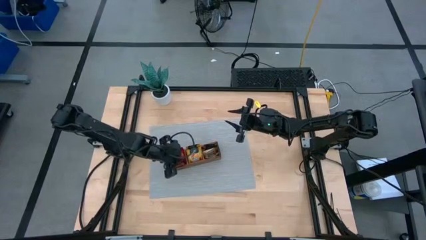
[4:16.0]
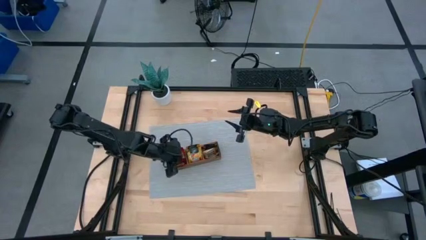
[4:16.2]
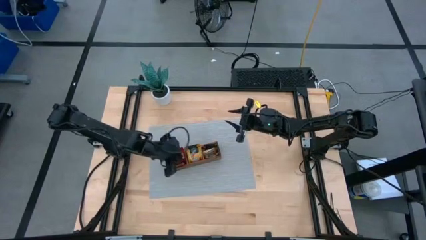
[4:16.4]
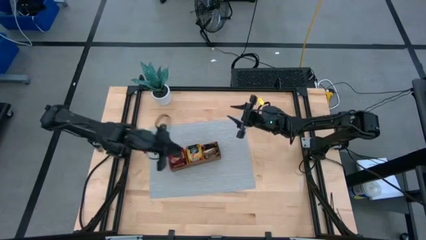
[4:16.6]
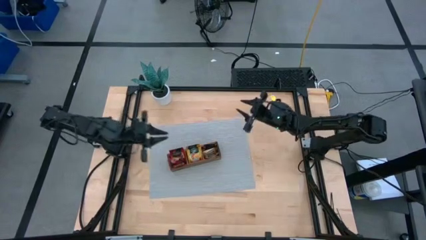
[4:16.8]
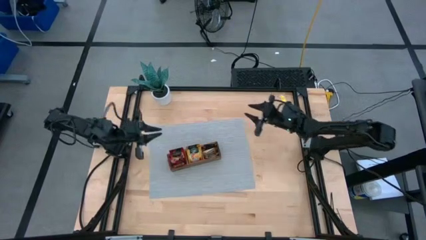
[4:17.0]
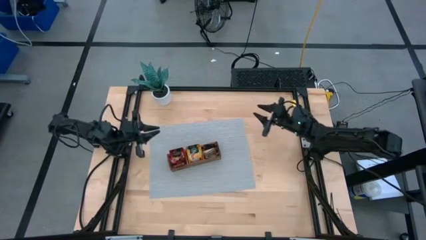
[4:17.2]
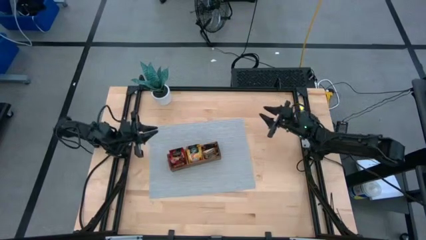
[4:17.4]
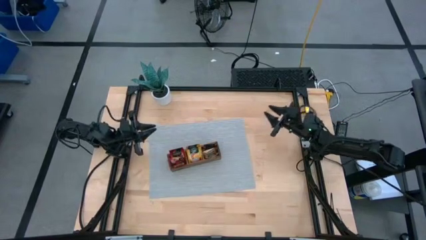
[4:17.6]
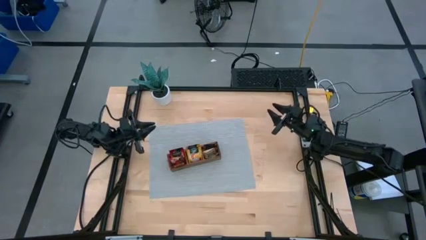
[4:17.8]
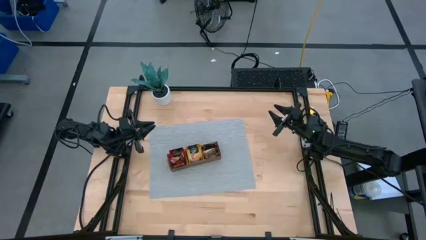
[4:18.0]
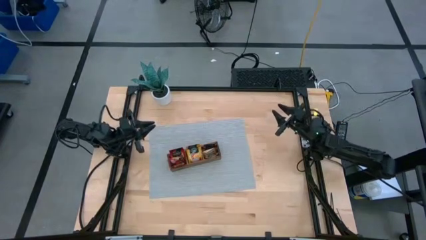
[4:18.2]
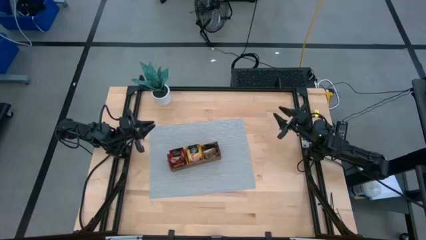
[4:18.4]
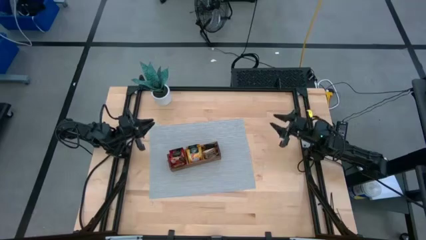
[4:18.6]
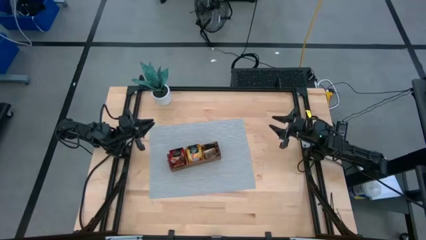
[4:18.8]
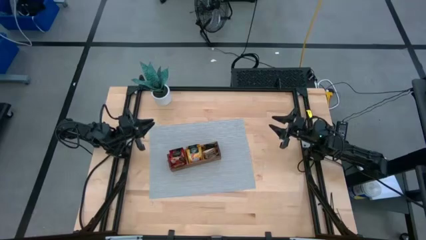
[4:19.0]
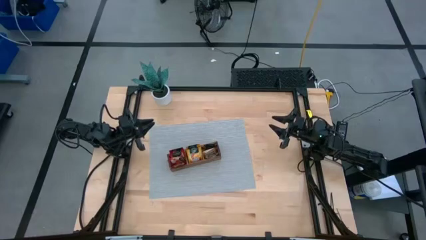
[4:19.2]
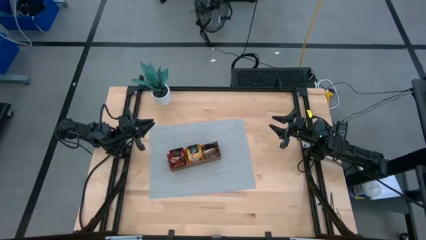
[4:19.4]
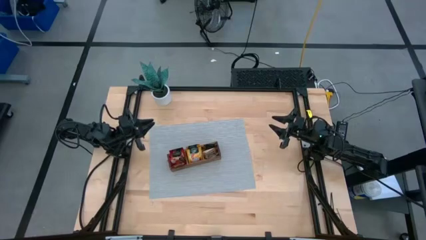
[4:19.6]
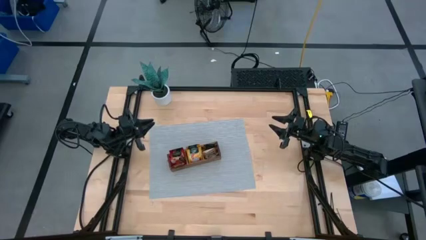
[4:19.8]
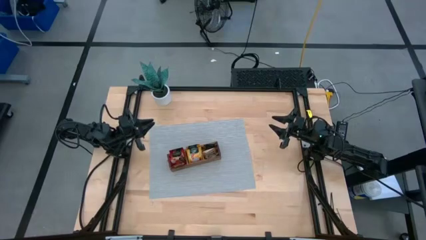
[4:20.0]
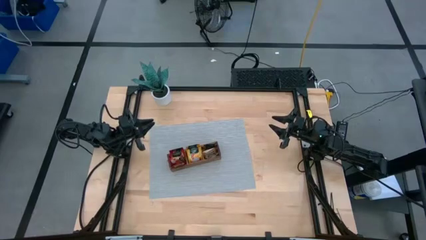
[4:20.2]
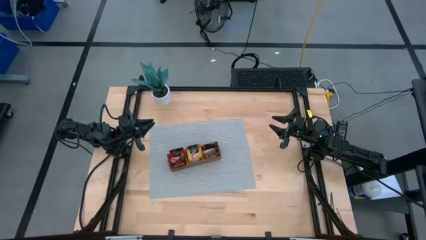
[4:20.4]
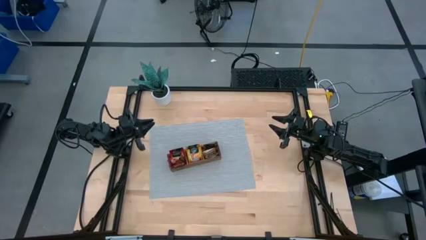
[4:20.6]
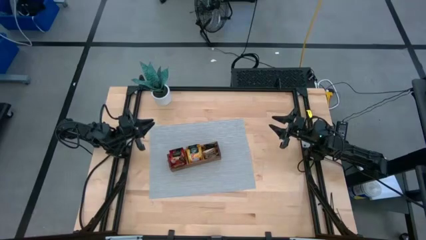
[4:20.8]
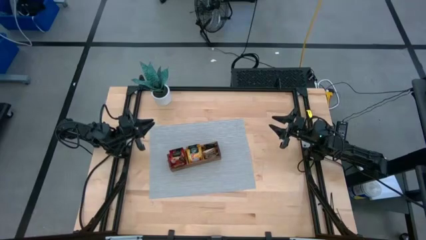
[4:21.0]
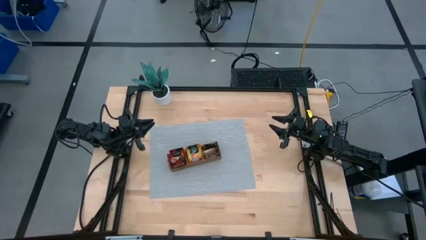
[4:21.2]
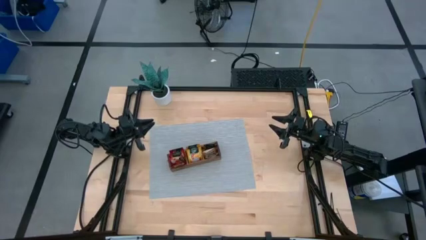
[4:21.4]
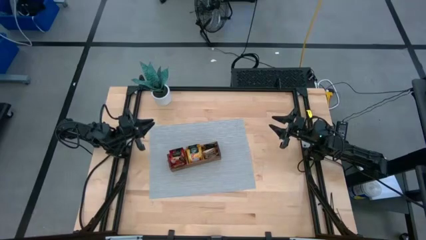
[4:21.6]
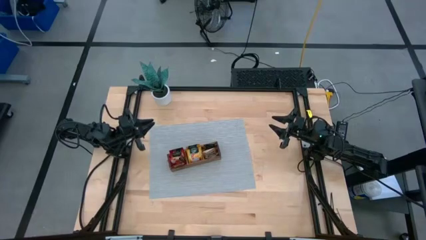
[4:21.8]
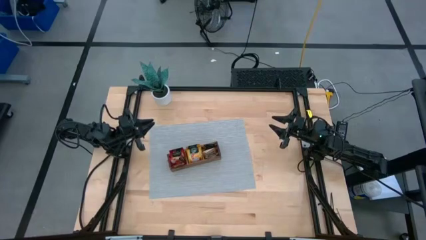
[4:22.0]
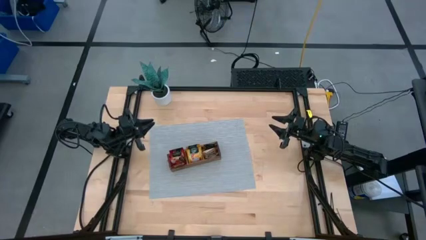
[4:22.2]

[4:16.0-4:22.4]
Task: Pick & Place Tea
Return to Home Position

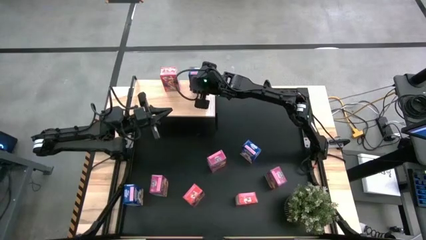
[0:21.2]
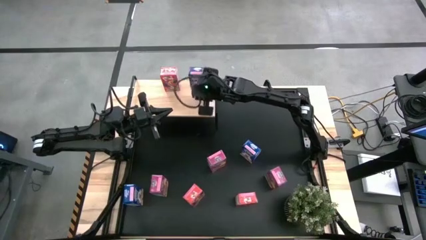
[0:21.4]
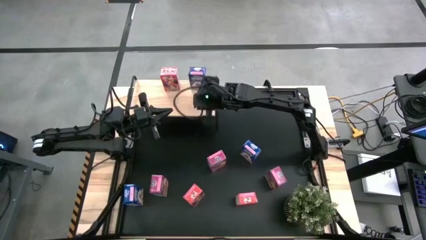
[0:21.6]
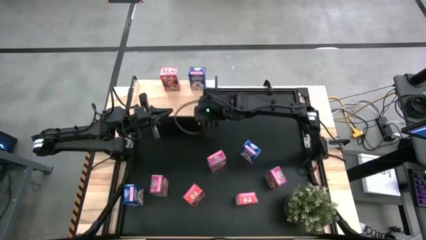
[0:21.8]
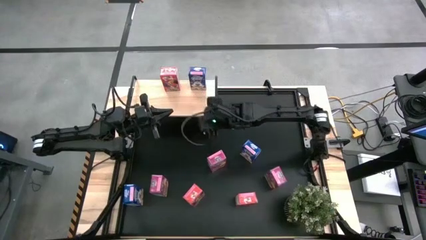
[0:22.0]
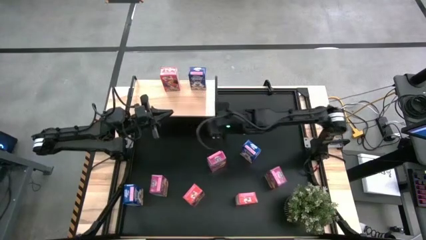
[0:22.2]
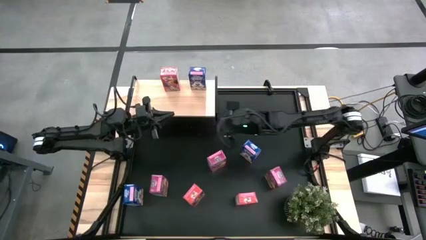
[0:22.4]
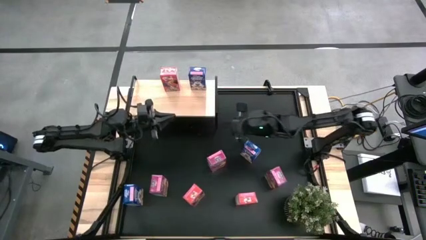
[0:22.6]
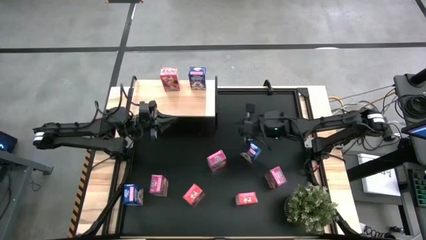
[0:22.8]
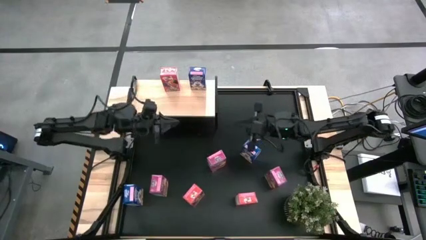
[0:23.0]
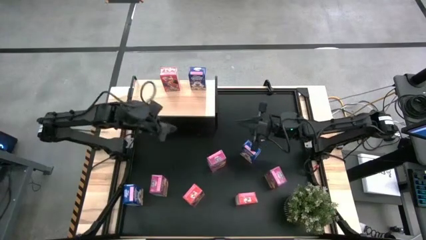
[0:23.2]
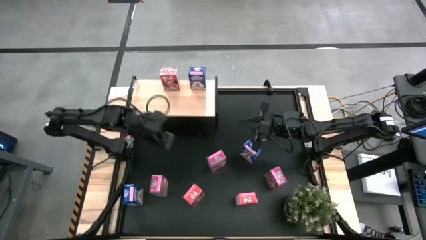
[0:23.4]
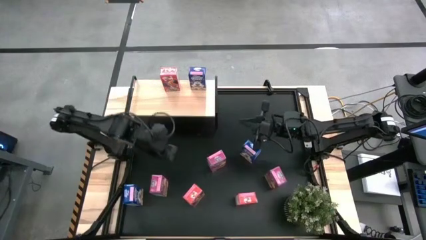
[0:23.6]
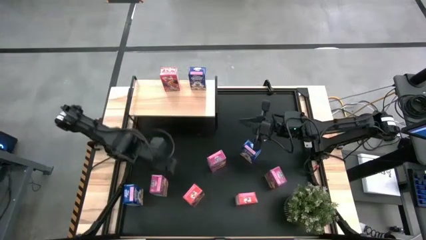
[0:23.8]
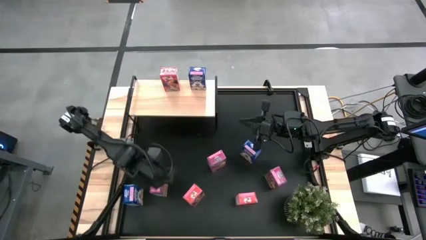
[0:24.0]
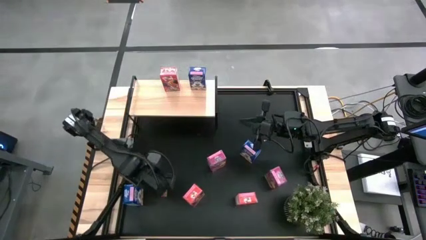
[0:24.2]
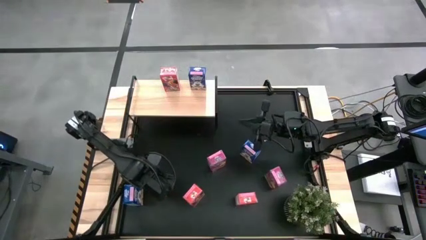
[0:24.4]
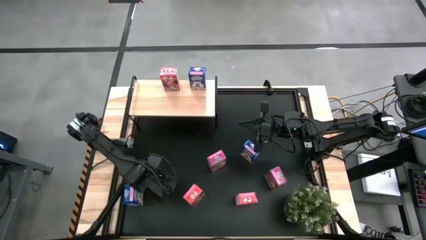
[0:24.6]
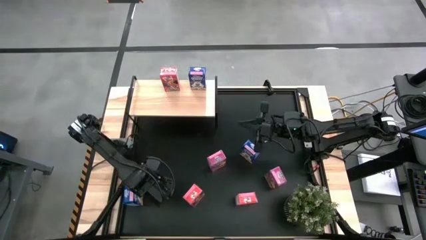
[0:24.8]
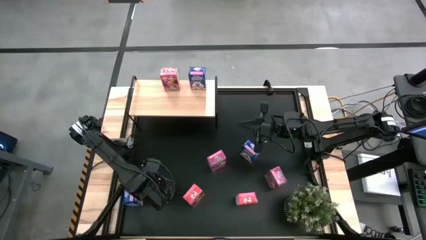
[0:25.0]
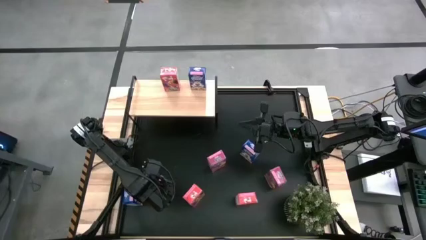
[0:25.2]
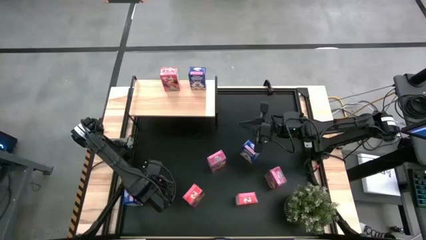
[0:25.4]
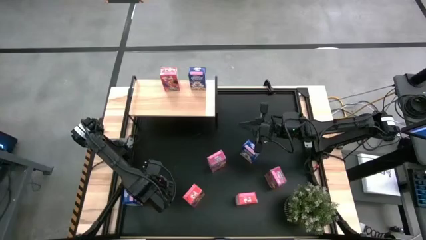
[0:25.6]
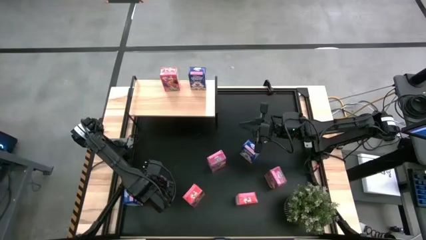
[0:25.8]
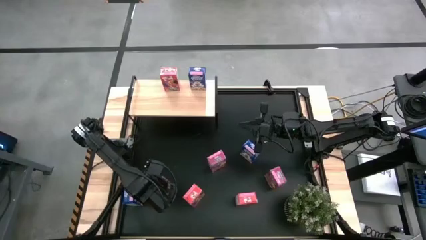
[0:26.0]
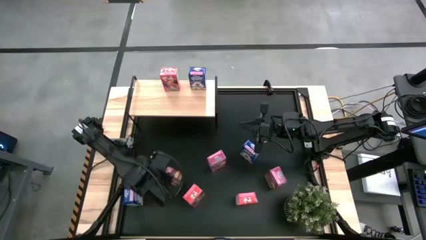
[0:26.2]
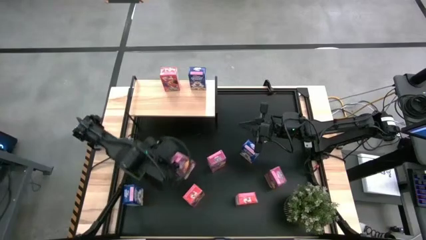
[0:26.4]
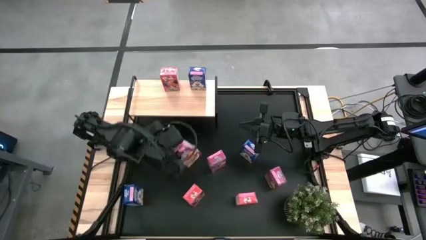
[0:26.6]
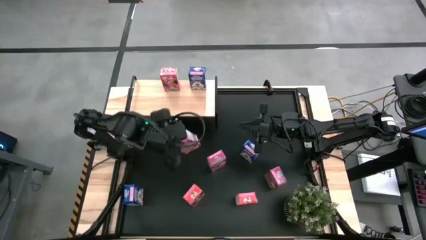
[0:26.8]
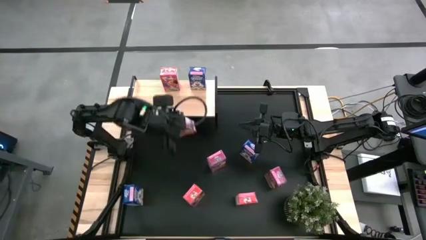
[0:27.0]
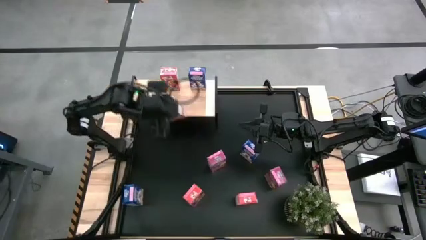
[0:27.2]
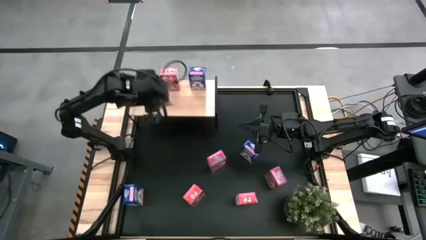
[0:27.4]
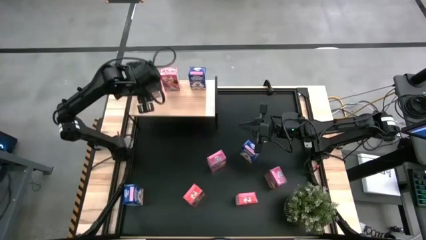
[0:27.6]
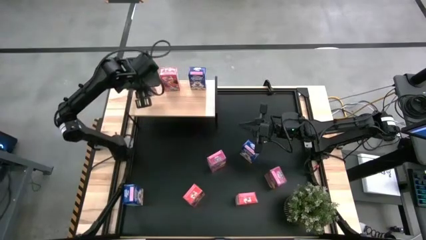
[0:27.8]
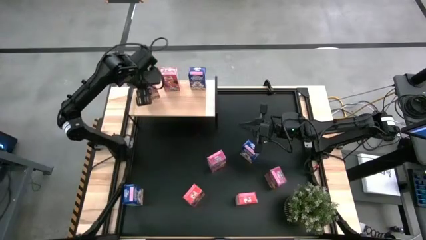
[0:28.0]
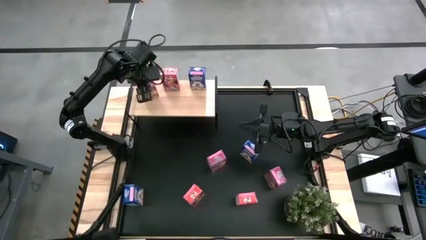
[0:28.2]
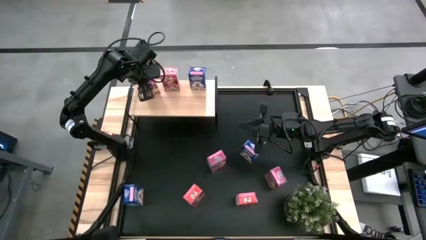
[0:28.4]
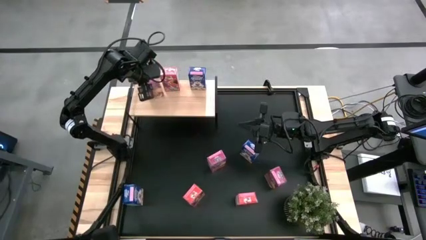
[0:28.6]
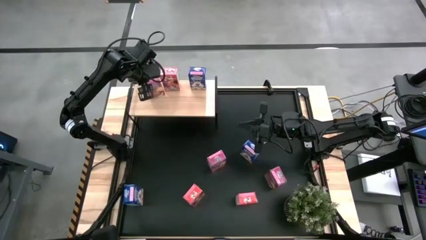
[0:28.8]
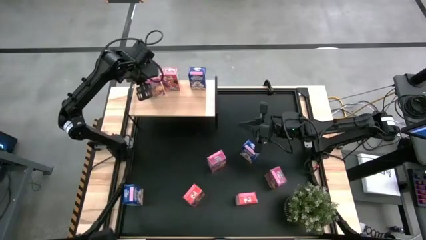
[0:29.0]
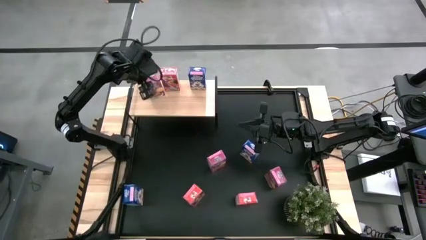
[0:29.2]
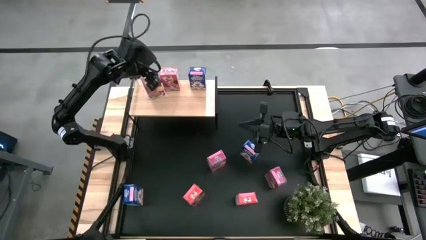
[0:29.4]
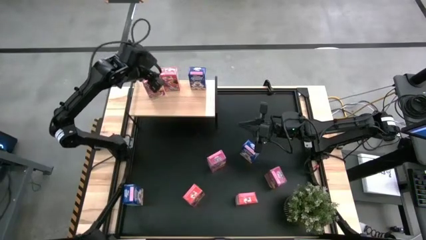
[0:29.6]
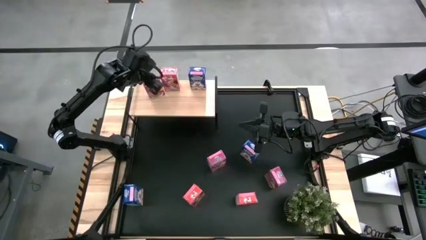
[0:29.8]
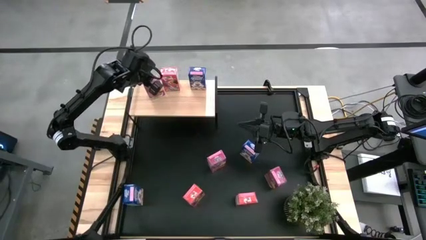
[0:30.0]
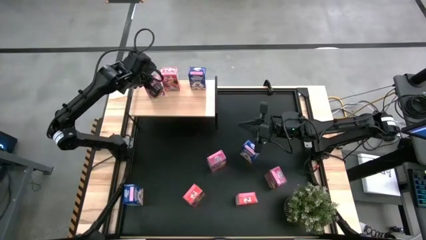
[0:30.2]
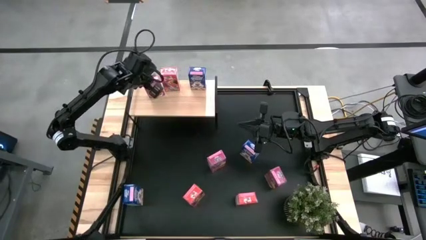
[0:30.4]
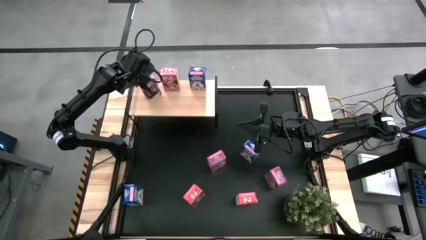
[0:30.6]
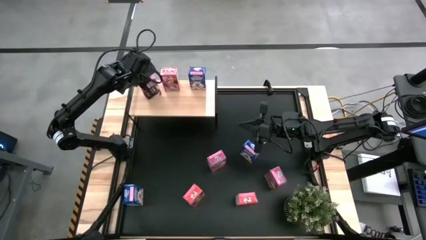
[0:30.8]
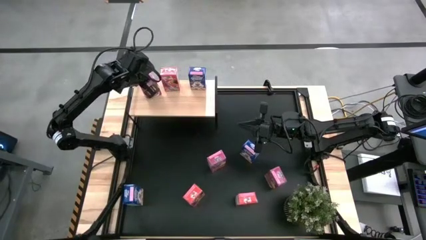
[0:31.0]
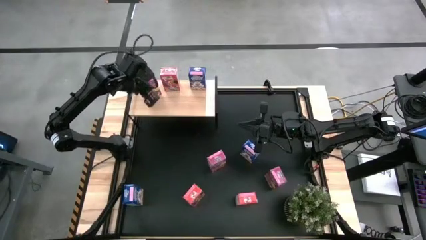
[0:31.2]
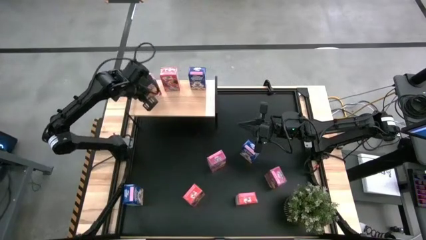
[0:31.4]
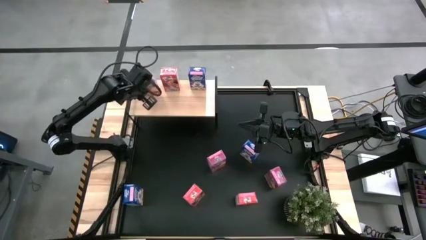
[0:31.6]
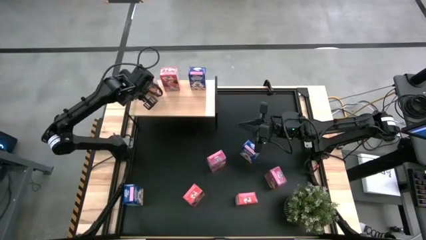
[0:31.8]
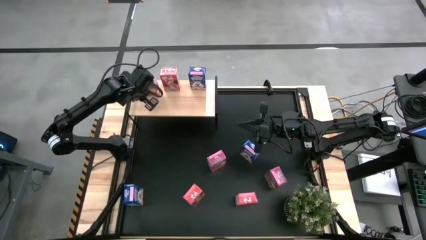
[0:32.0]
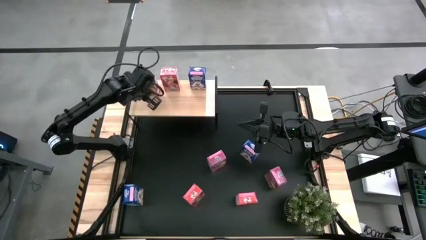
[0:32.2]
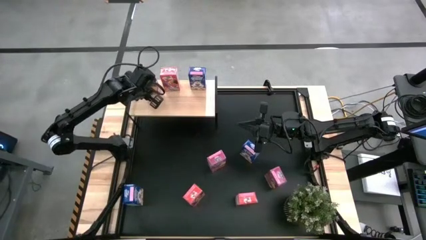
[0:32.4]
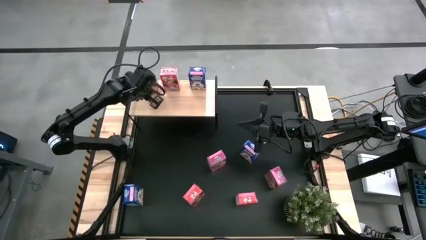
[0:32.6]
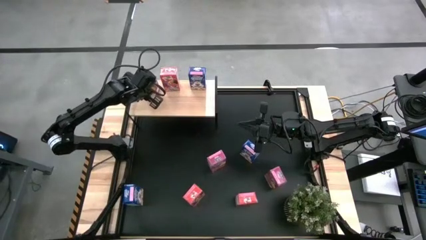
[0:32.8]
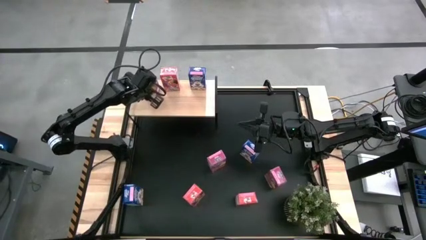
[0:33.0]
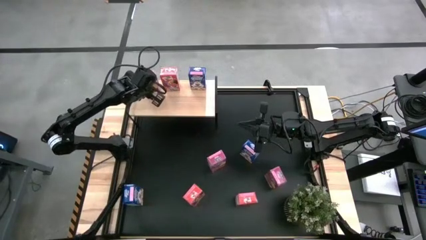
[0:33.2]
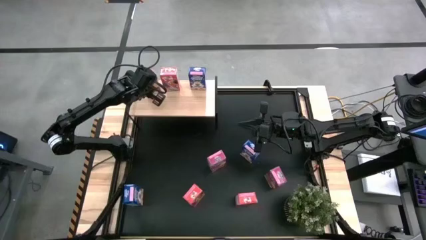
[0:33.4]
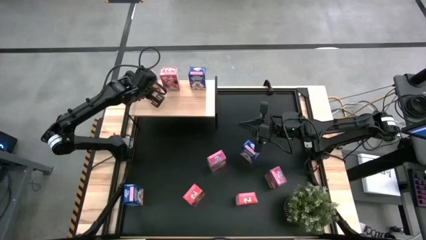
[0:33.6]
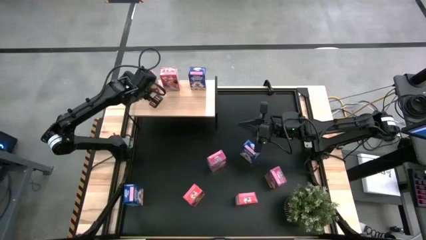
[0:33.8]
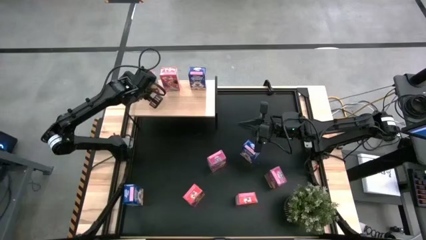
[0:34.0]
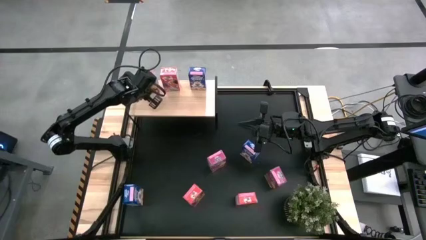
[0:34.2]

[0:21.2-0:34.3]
Task: Stack cereal on shelf
Put the left purple cereal box on the shelf
